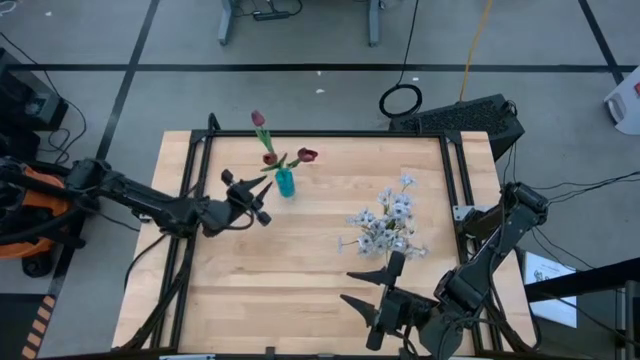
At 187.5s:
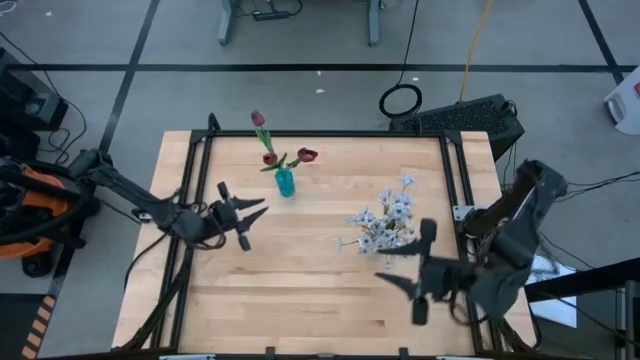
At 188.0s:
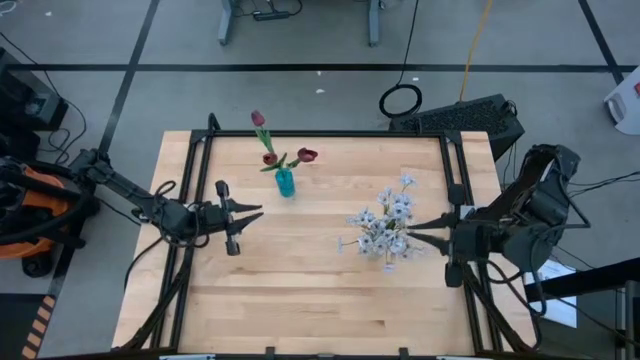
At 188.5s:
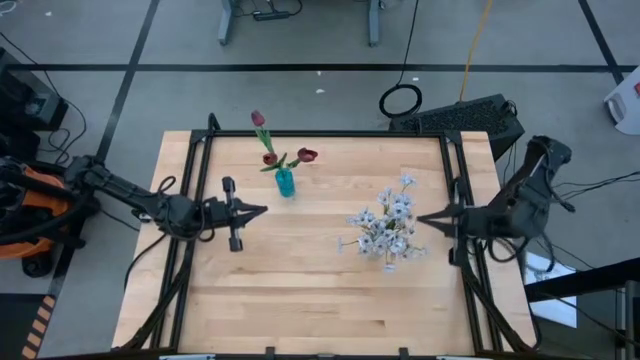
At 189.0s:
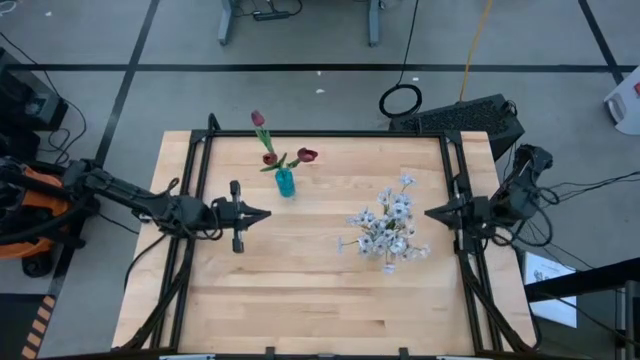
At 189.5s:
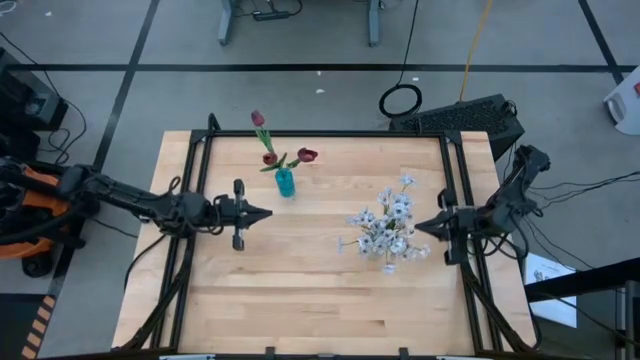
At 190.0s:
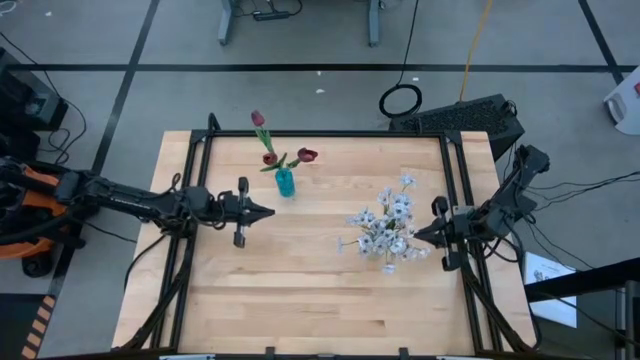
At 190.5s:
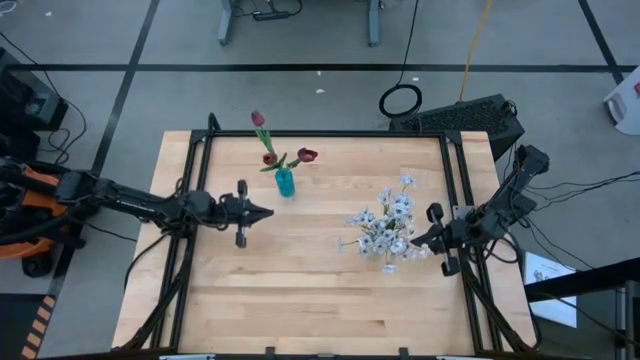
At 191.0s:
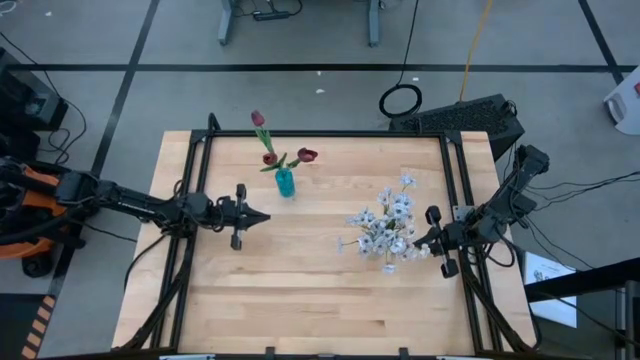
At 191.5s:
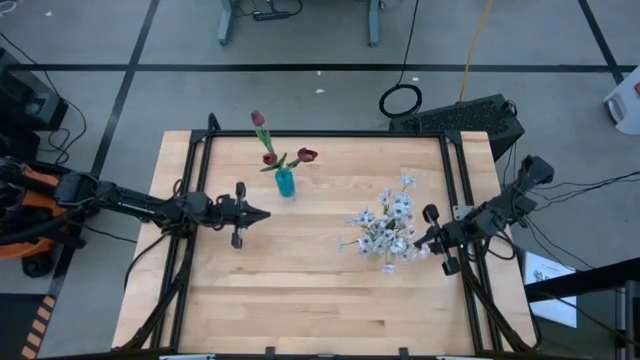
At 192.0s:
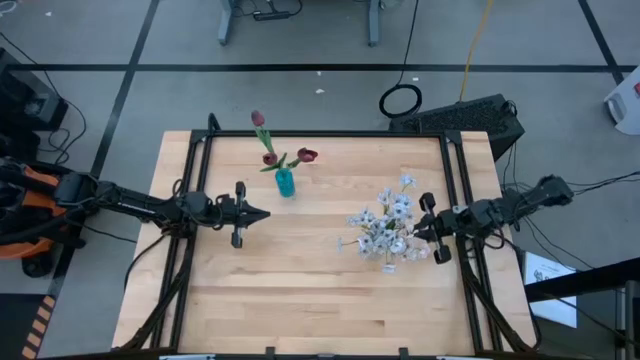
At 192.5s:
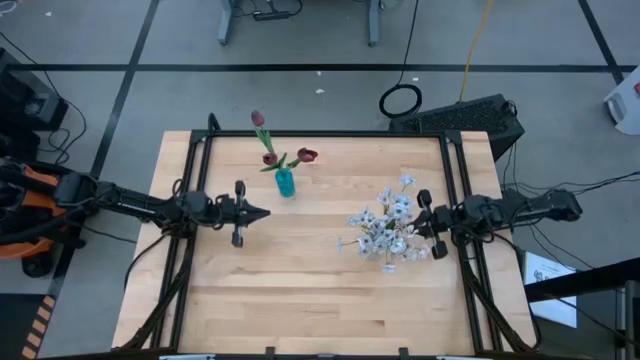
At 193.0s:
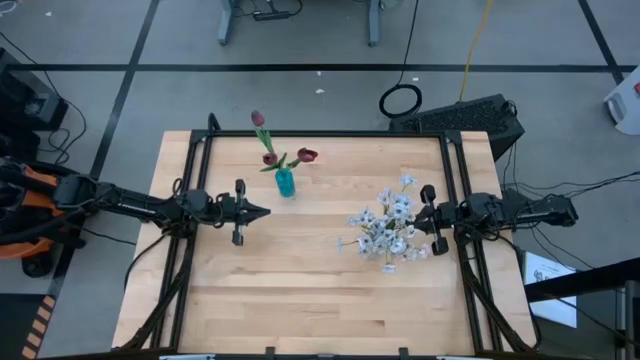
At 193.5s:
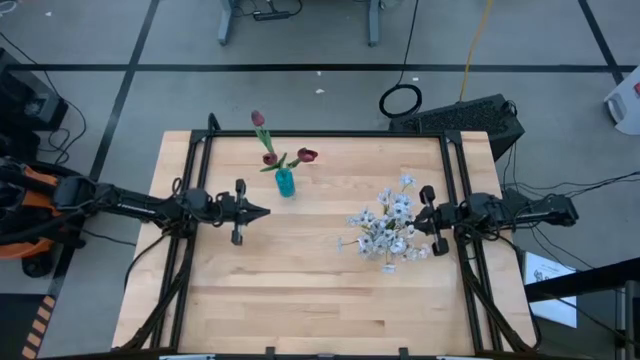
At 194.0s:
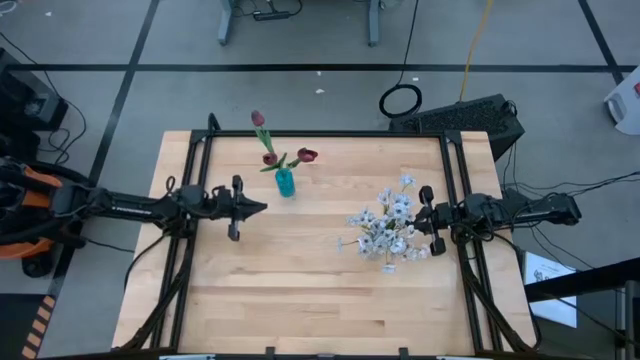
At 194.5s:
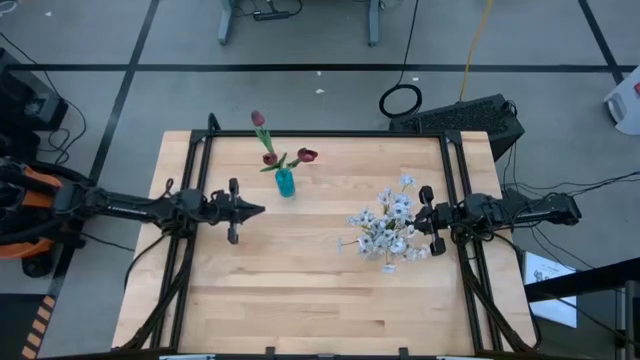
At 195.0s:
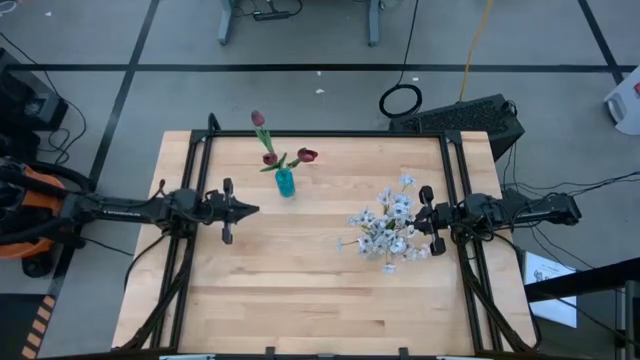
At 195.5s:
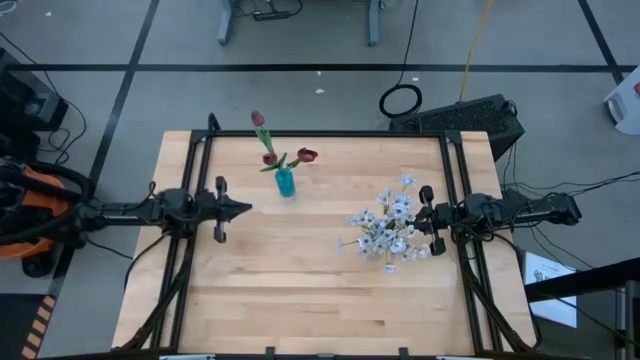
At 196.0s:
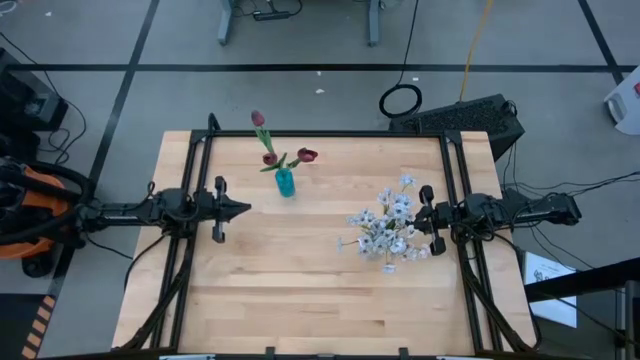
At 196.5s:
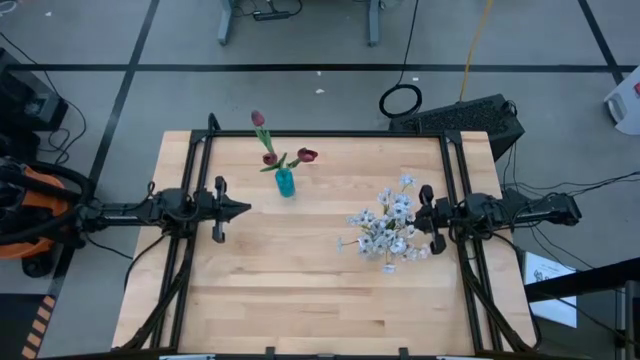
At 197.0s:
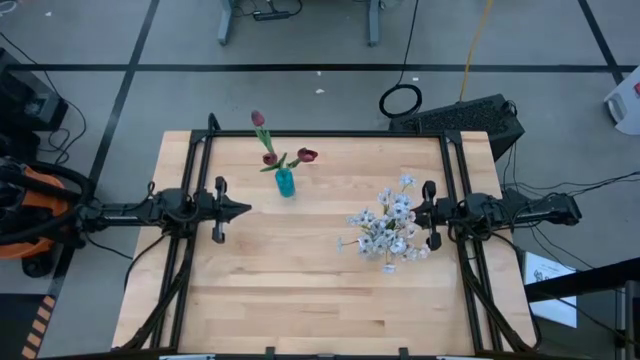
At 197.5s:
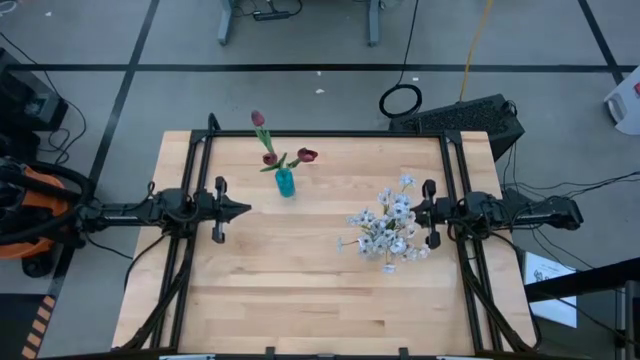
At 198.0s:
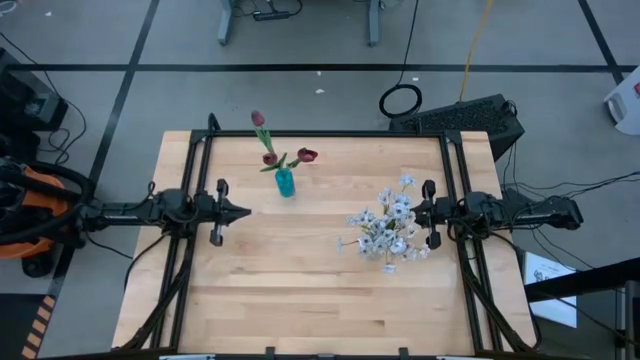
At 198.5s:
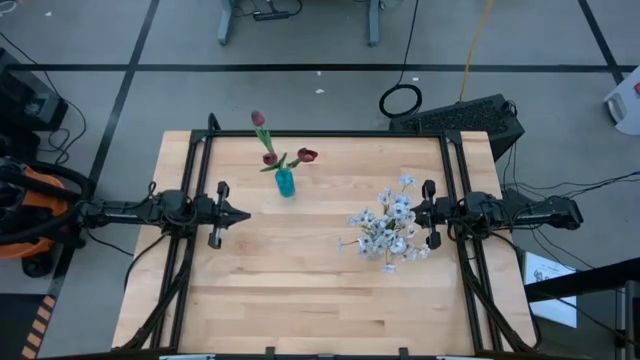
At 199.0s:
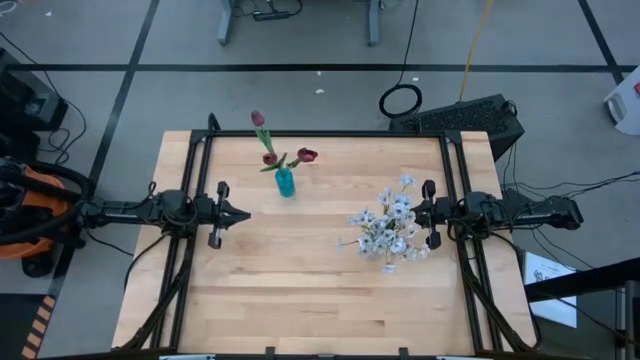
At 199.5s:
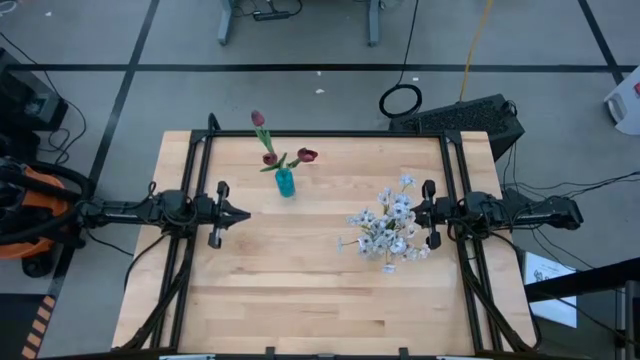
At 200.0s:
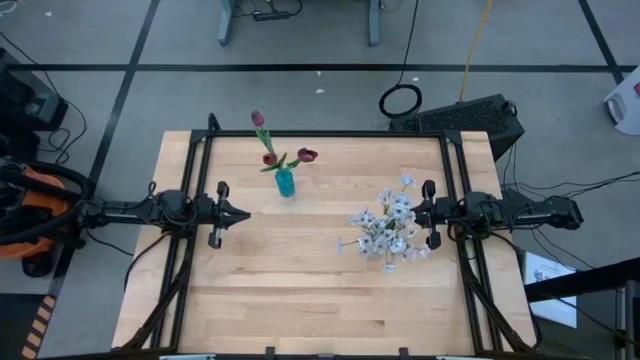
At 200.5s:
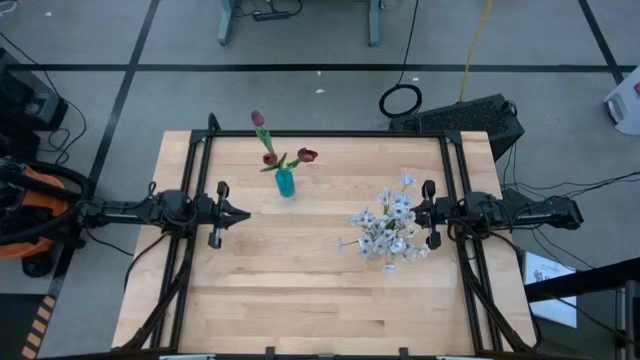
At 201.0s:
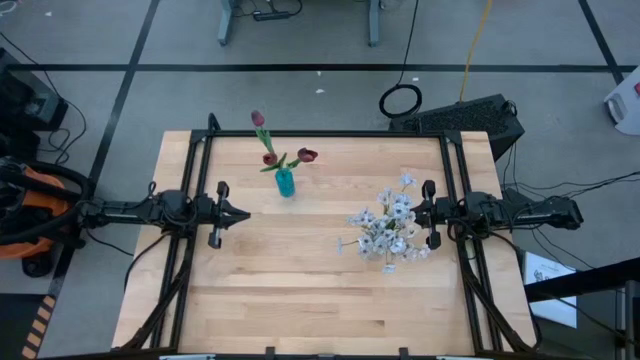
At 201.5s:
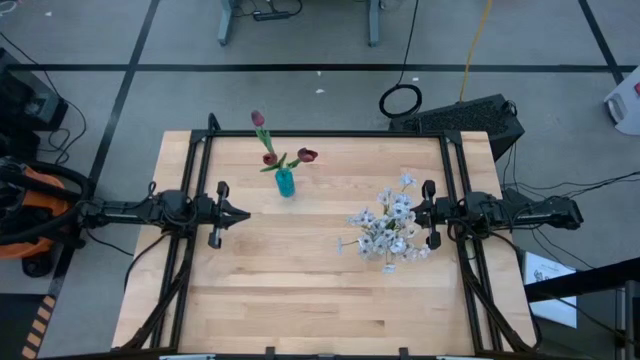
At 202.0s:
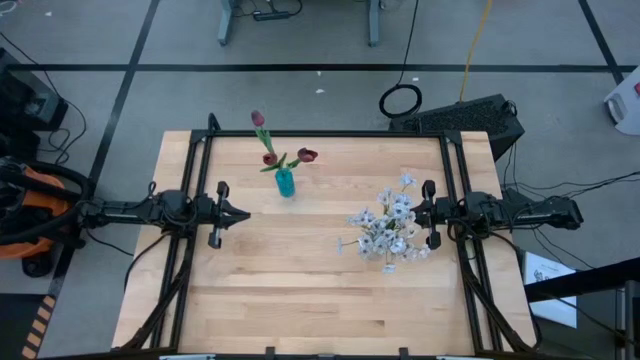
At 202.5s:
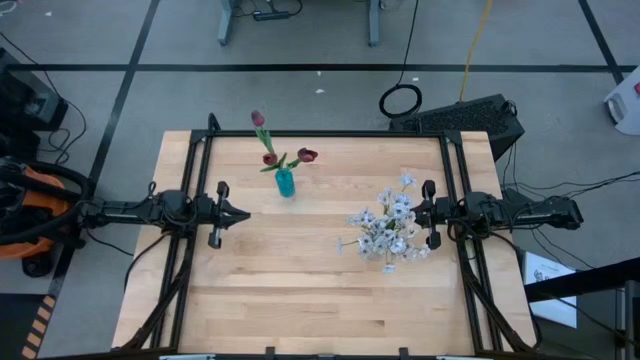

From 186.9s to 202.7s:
Task: Sort flowers into vase by color
Return to home position

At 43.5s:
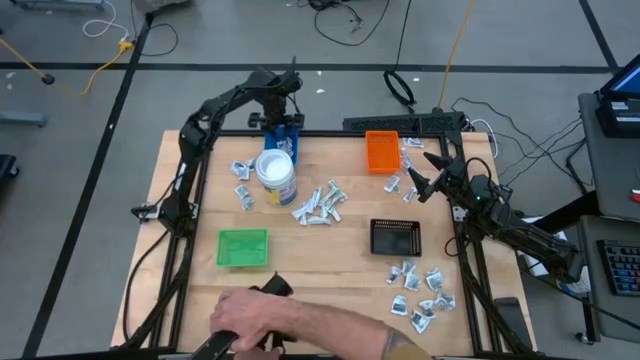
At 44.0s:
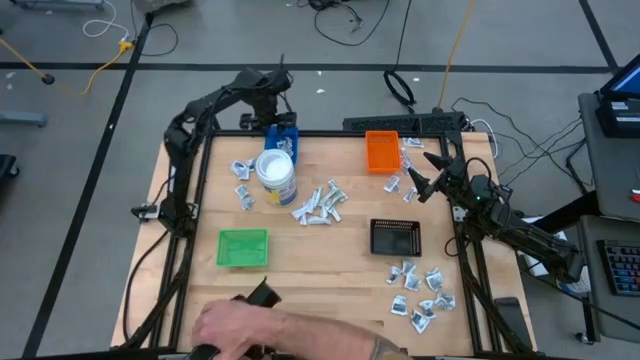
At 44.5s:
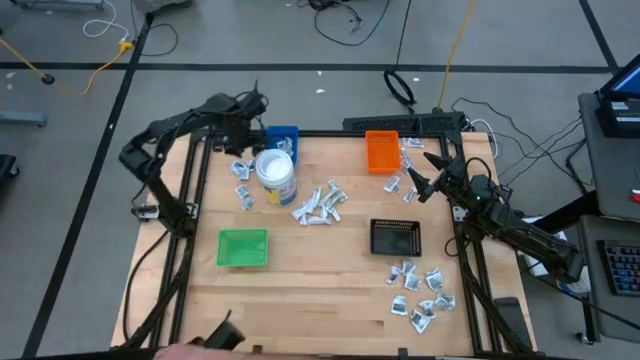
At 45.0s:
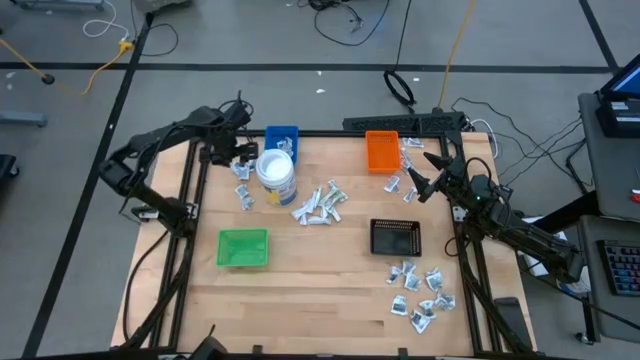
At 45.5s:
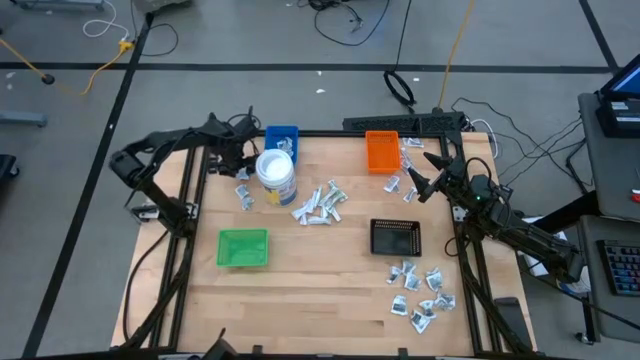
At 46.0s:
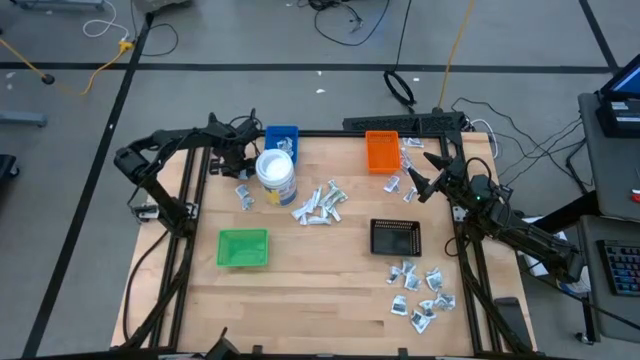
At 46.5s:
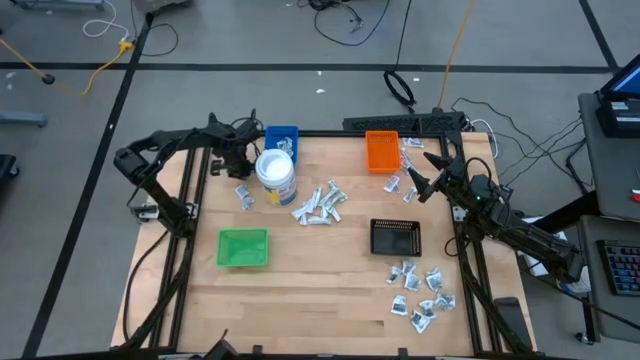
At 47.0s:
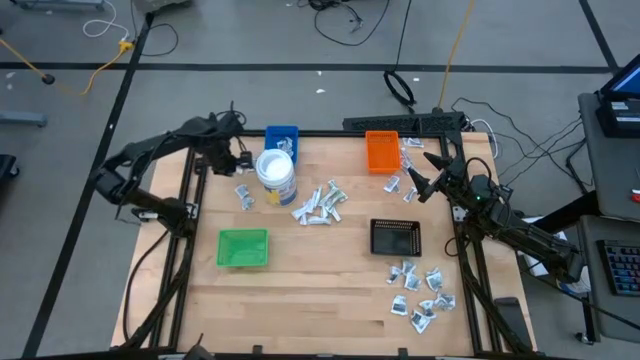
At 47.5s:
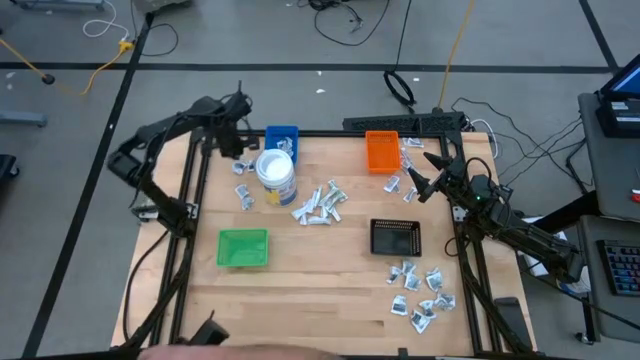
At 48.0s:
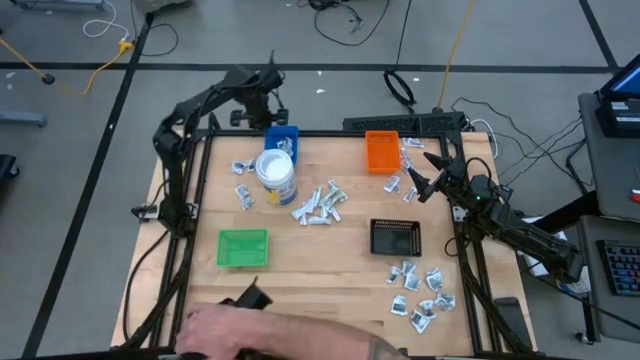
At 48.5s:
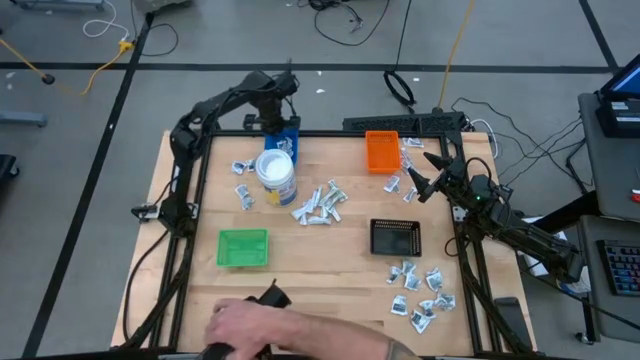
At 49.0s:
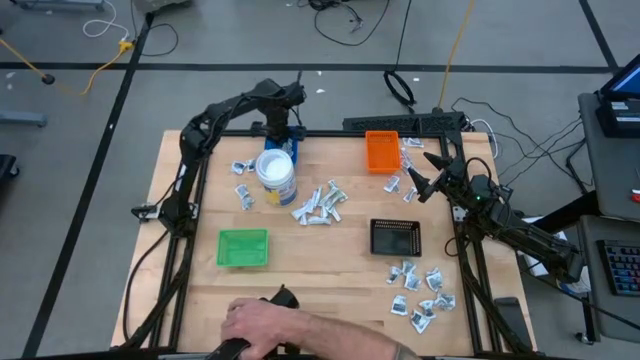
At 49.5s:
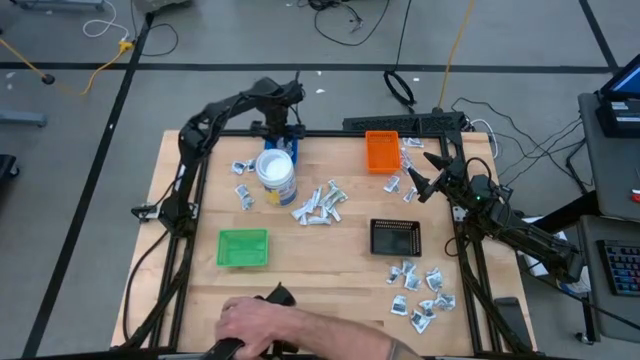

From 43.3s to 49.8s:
Task: Pick & Place First Aid Supplies
Put the blue alcohol pad into the blue bin
